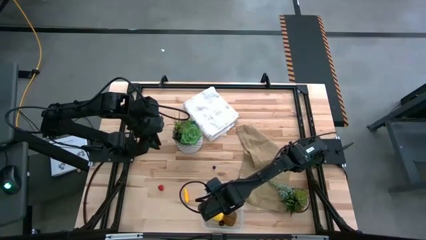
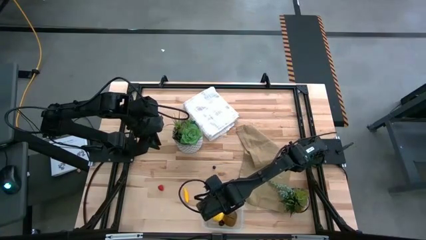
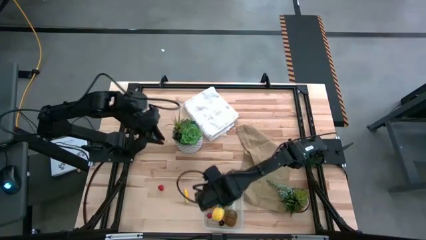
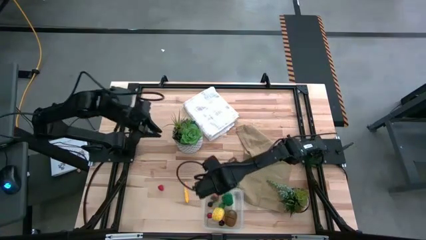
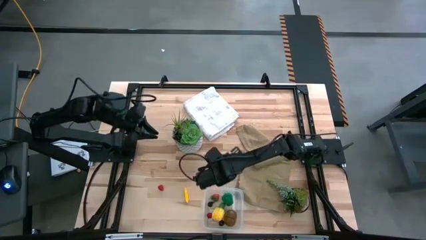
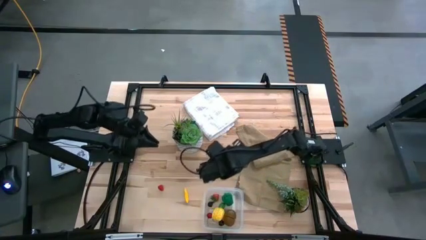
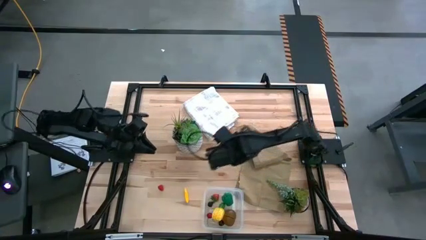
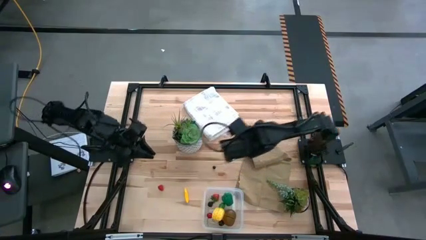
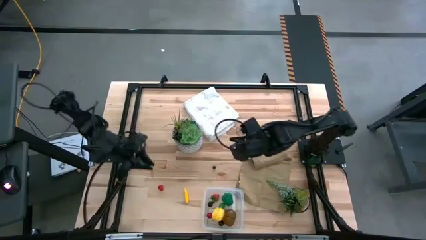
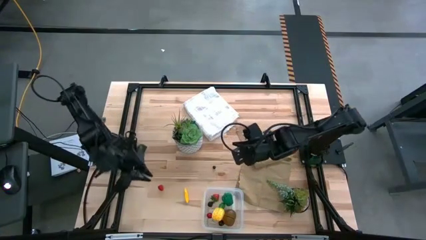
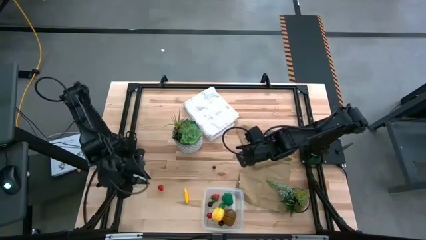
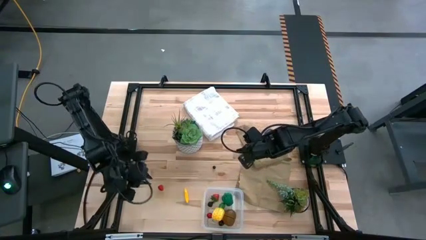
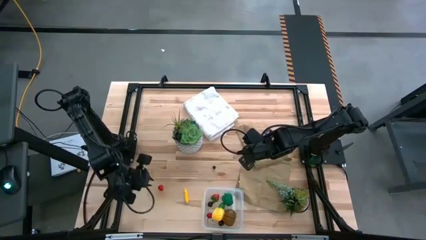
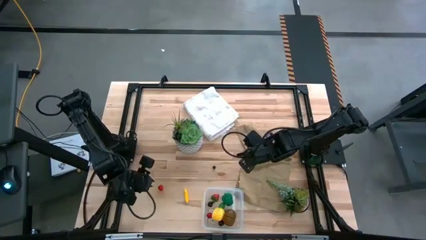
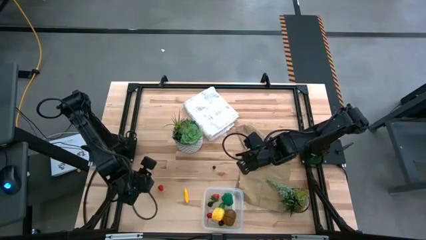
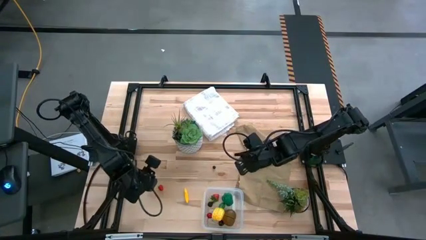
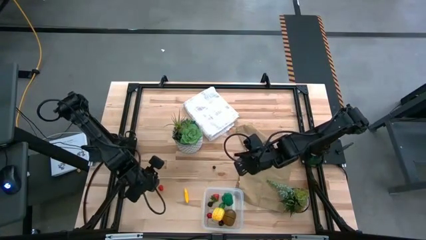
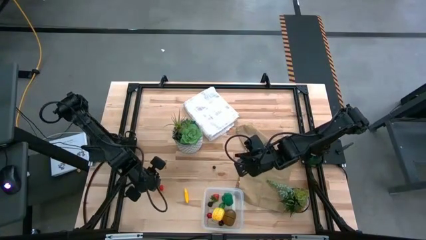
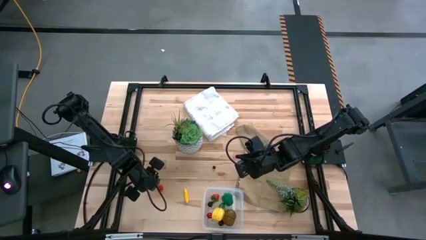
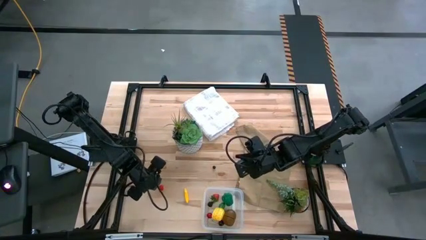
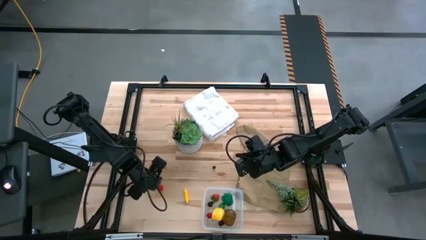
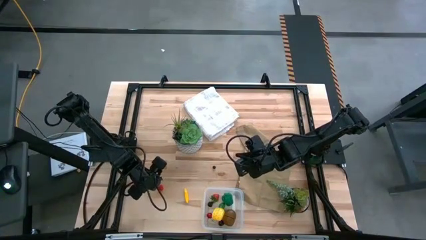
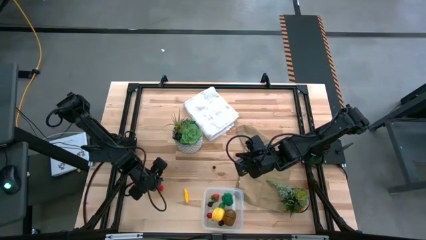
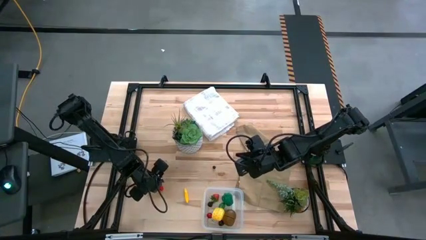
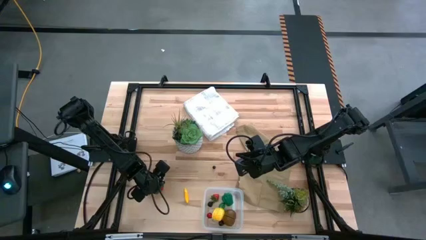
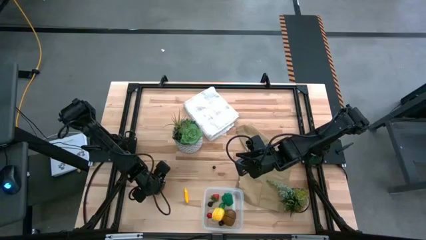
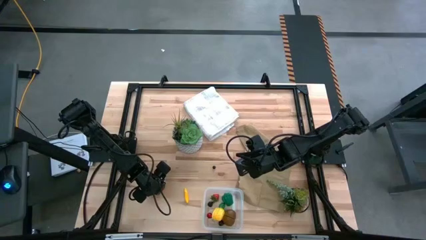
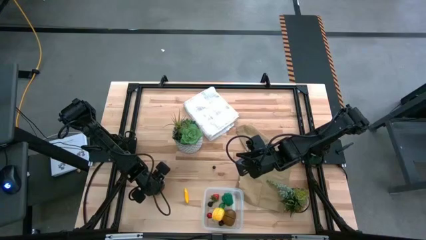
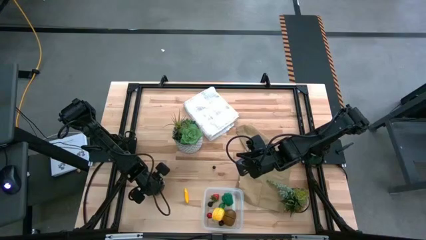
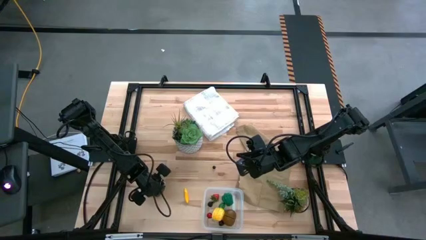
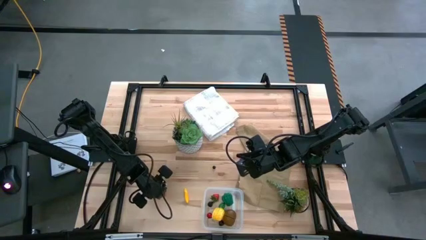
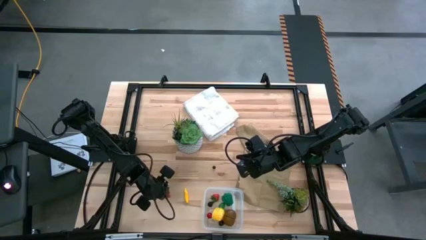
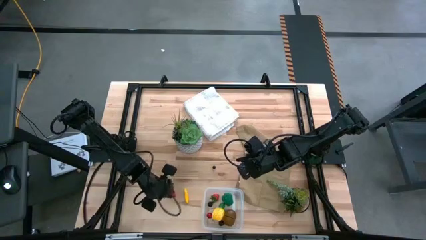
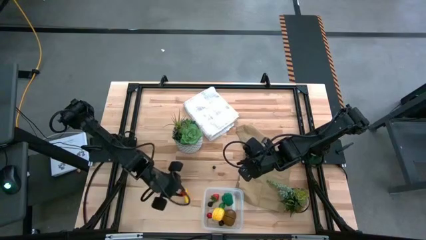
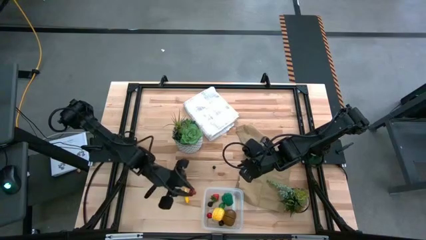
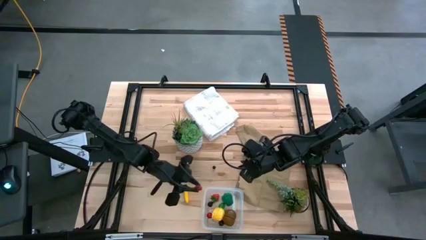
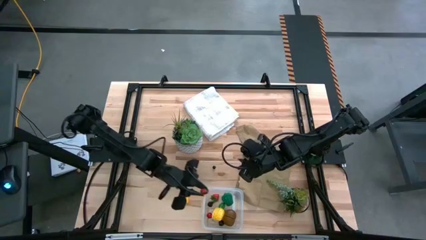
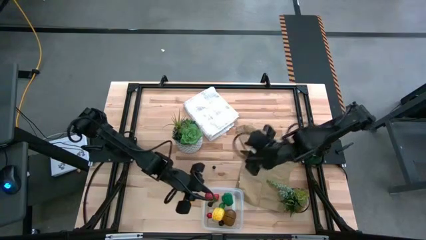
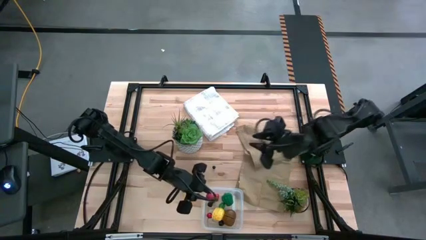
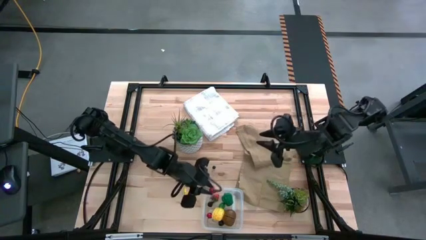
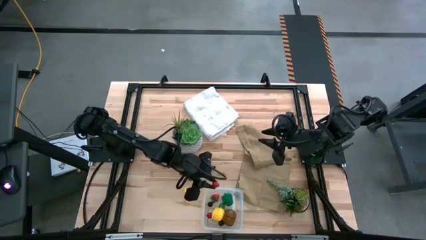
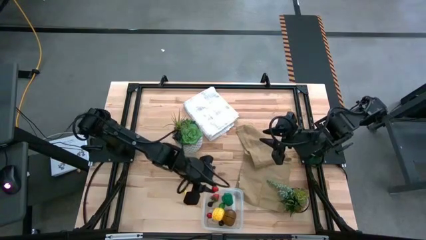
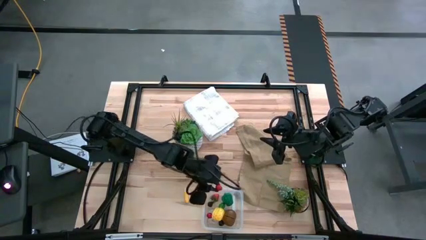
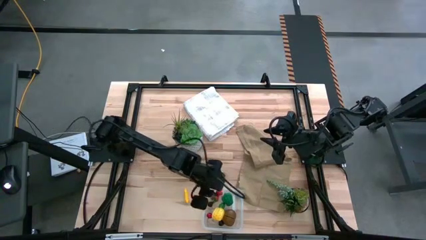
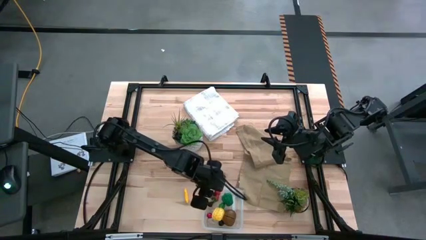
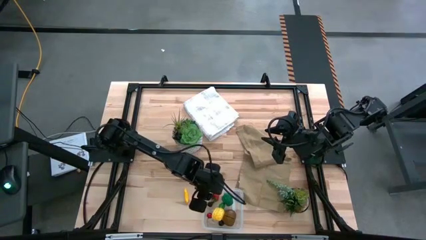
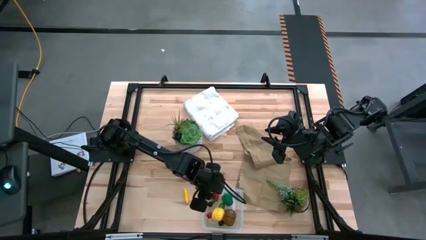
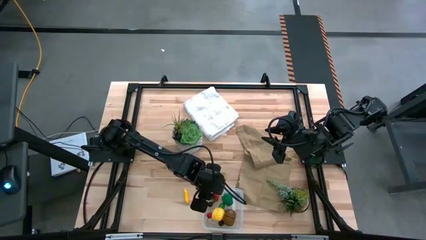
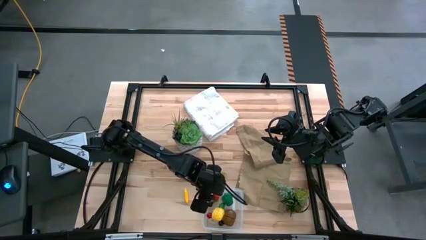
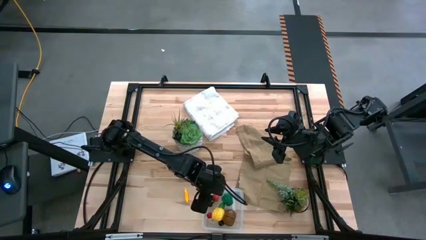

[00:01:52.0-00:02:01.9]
Task: Pick and placing Produce into tupperware
Put the red raspberry into the transparent bin

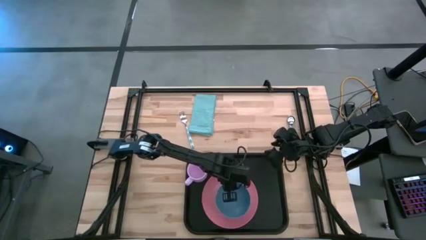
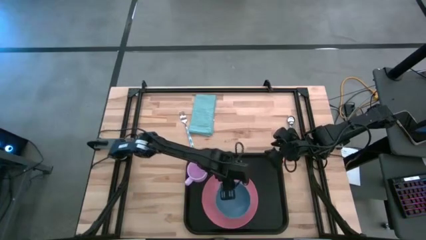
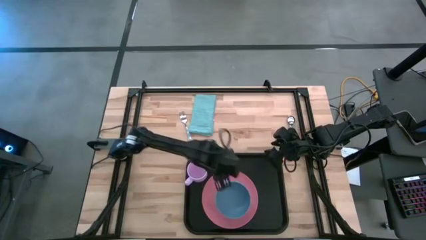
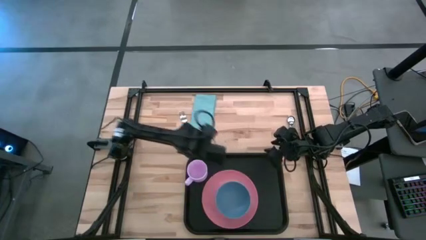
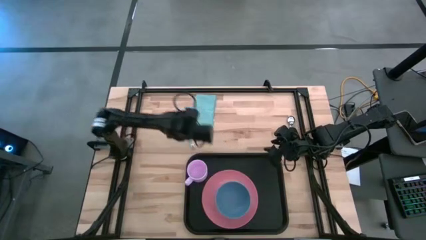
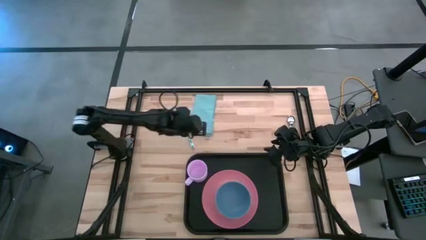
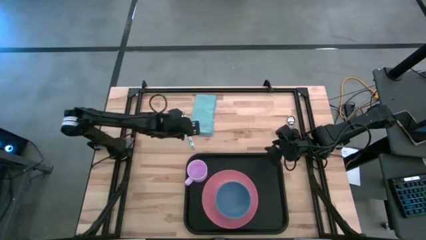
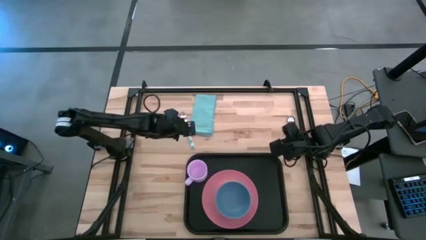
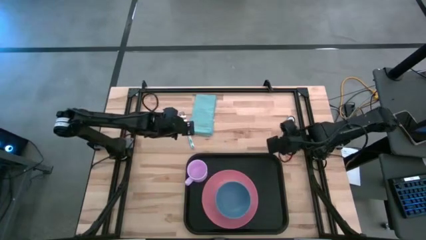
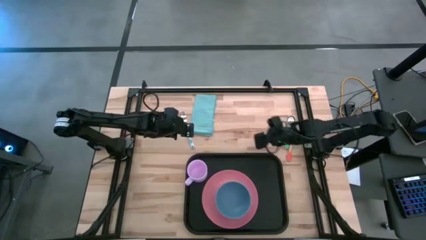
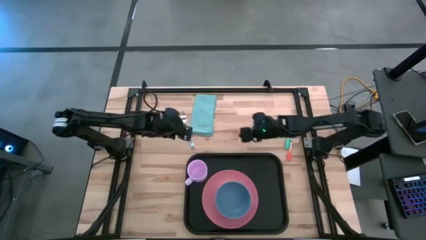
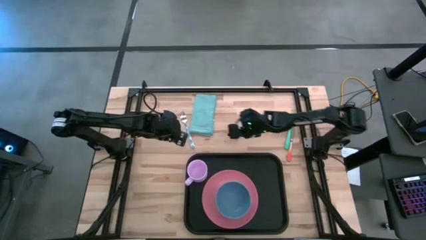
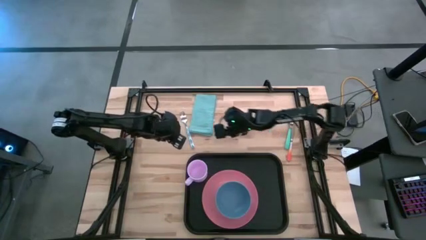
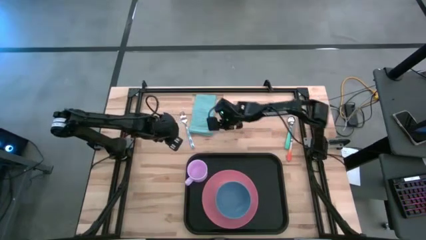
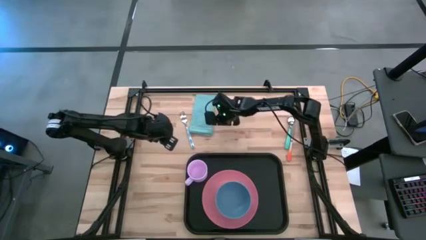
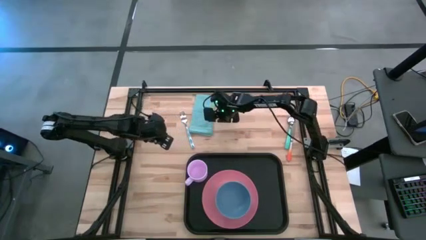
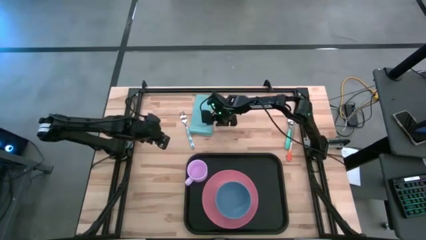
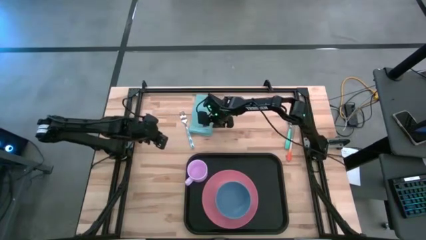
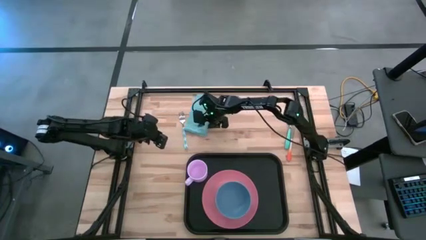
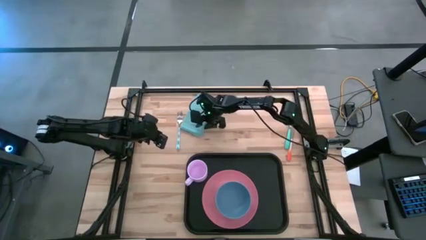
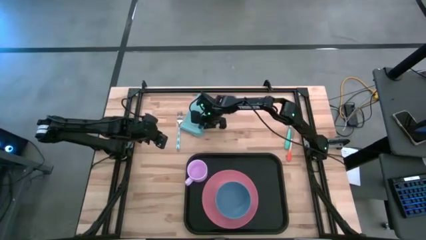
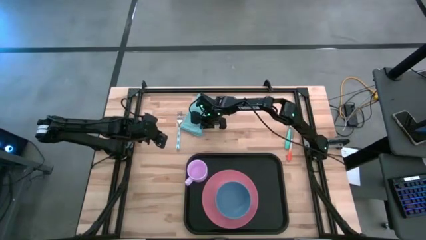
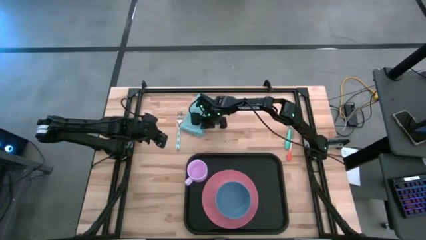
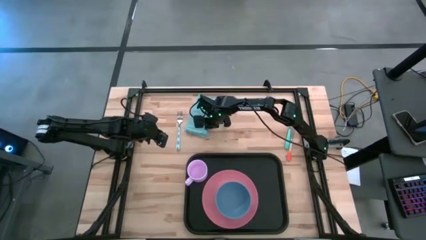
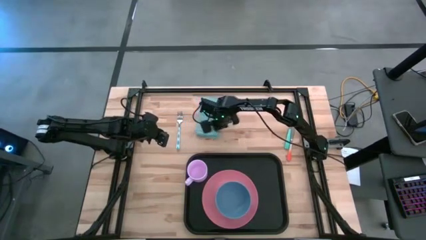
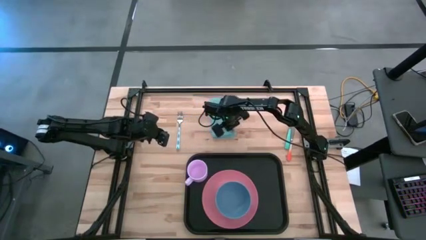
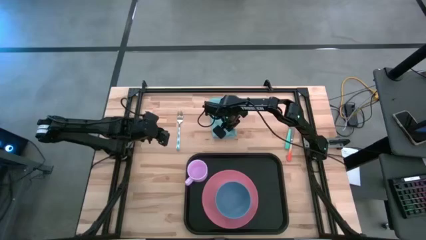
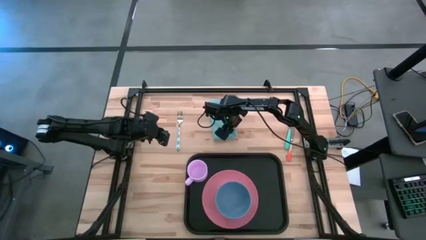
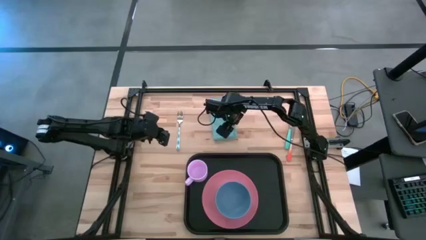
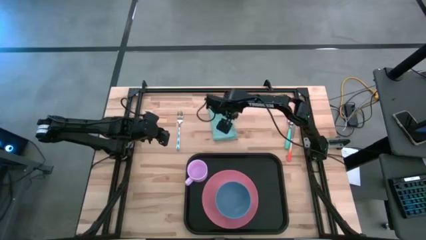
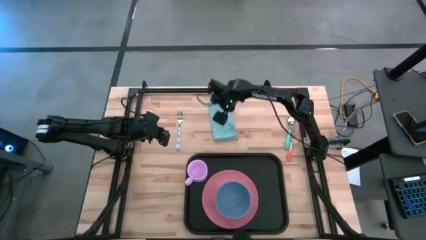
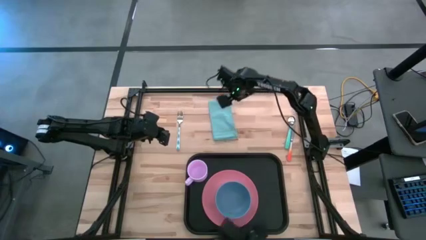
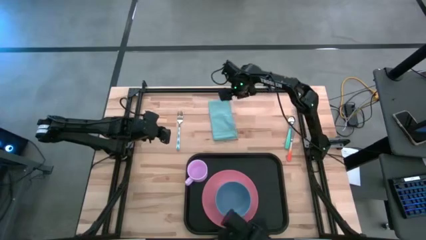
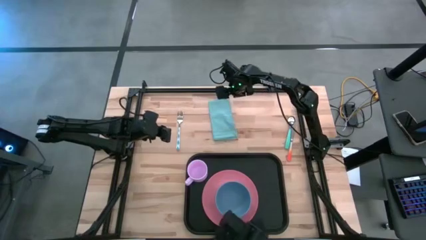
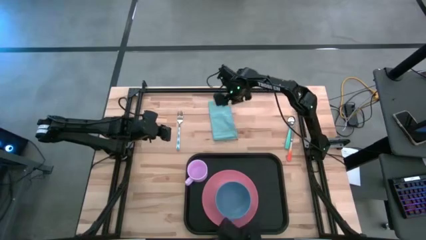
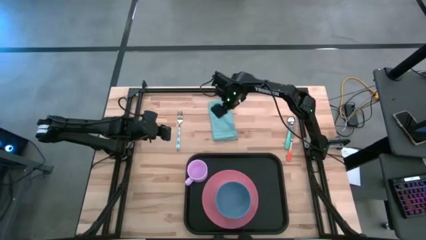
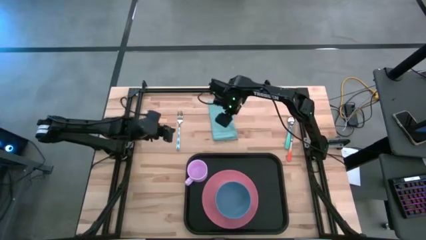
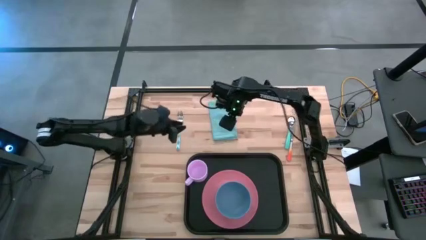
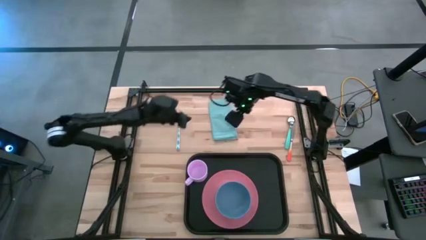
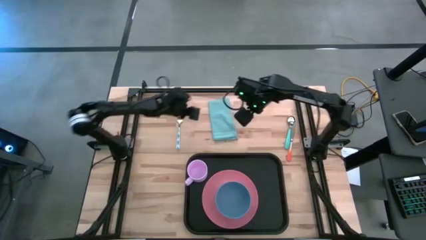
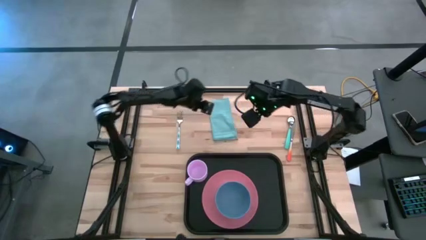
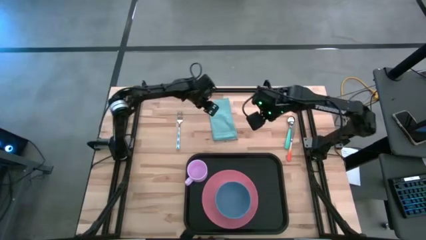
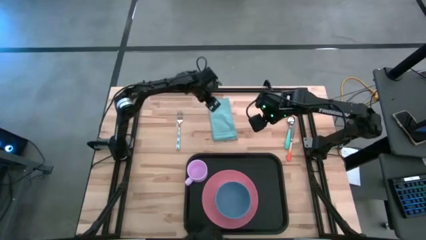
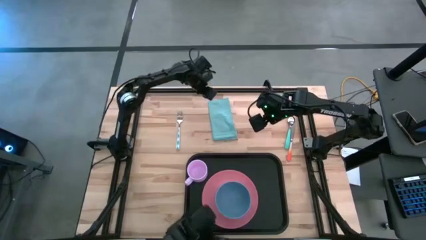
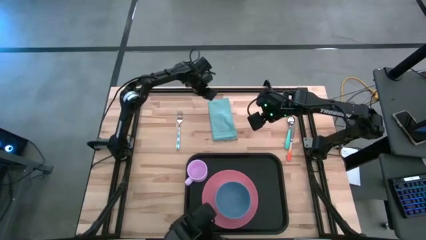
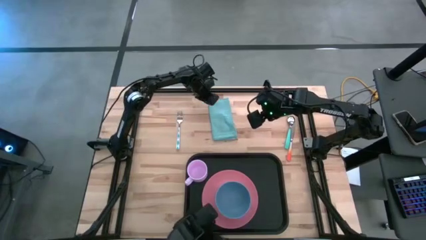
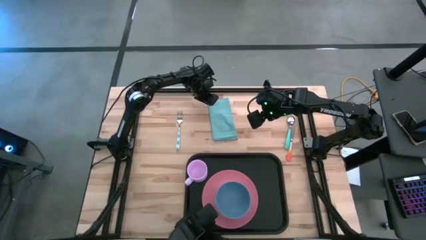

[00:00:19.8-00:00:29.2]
Task: Set up tray
Put the blue napkin on the black serving tray to the right of the pink plate
